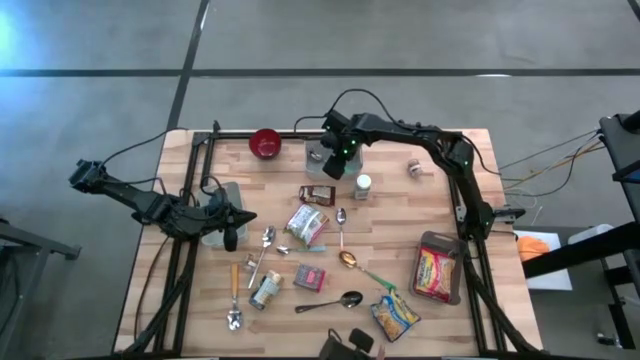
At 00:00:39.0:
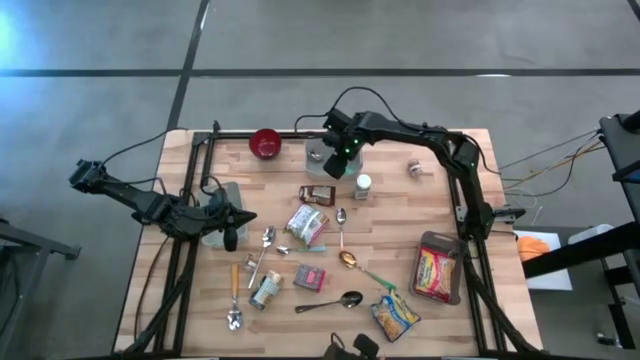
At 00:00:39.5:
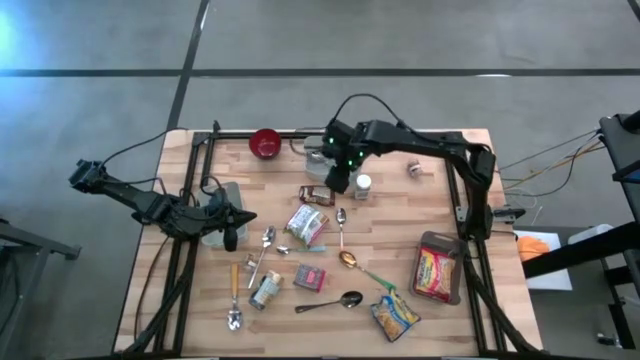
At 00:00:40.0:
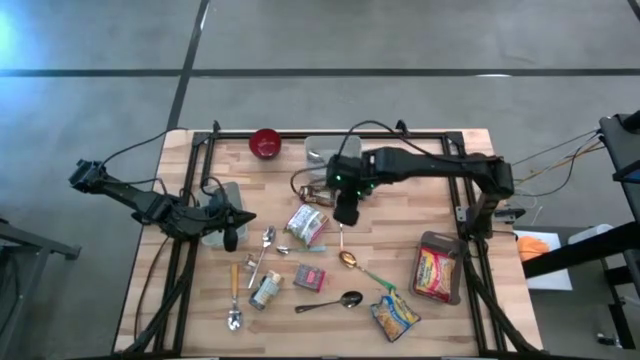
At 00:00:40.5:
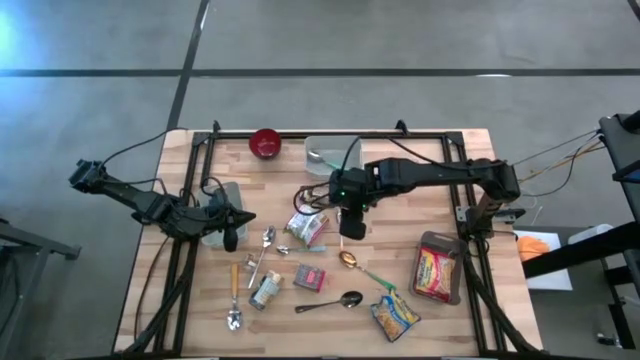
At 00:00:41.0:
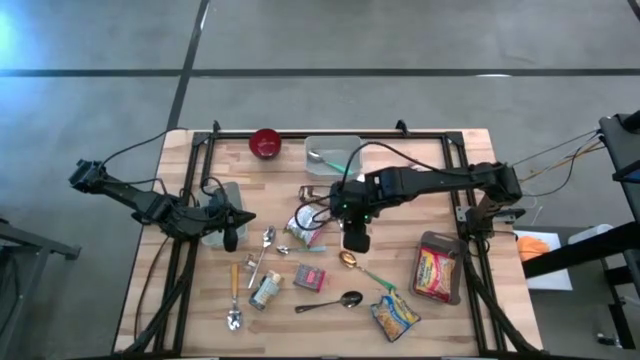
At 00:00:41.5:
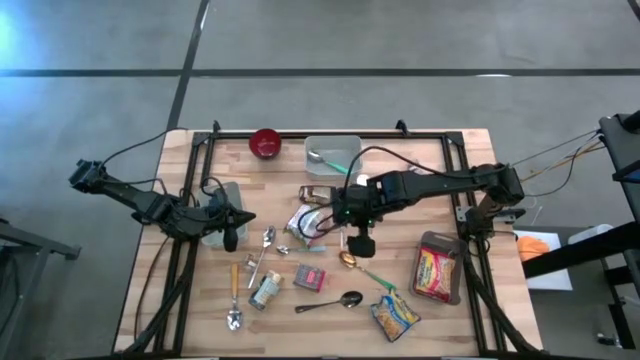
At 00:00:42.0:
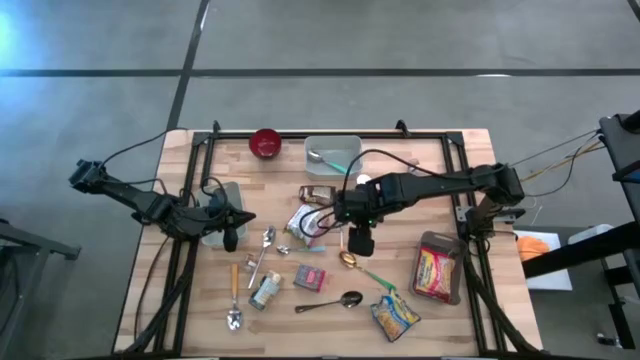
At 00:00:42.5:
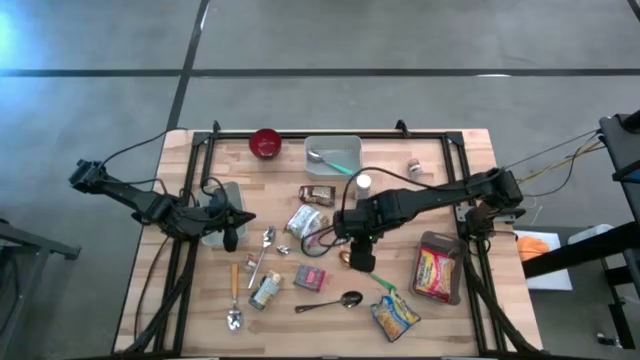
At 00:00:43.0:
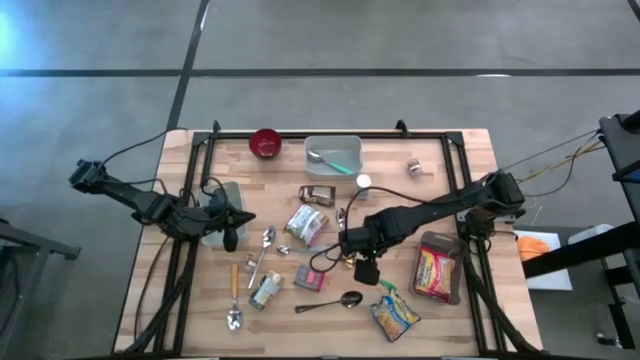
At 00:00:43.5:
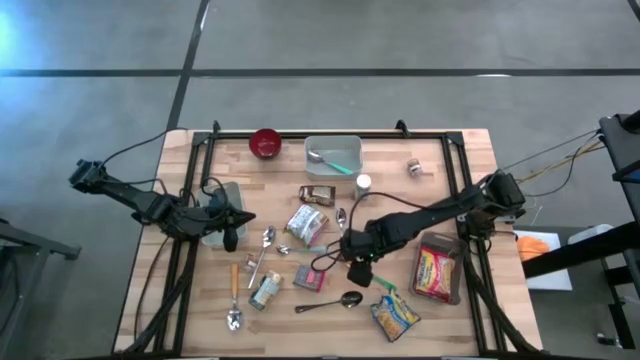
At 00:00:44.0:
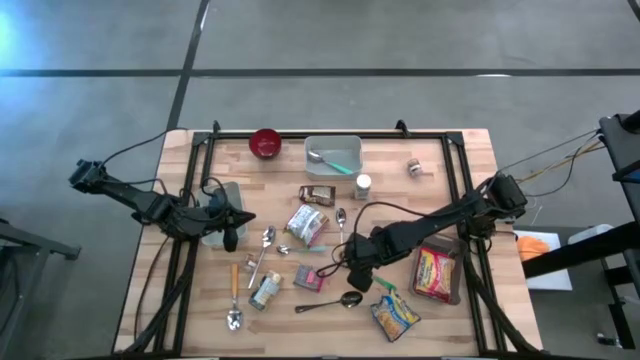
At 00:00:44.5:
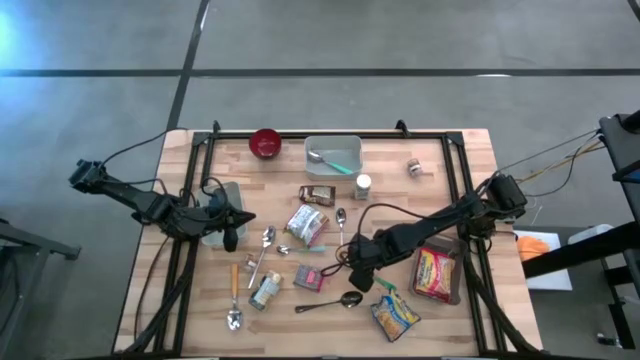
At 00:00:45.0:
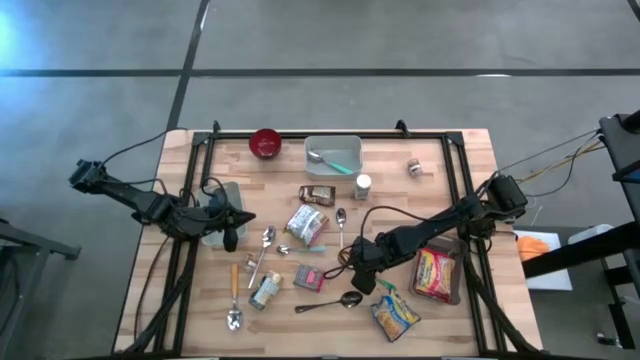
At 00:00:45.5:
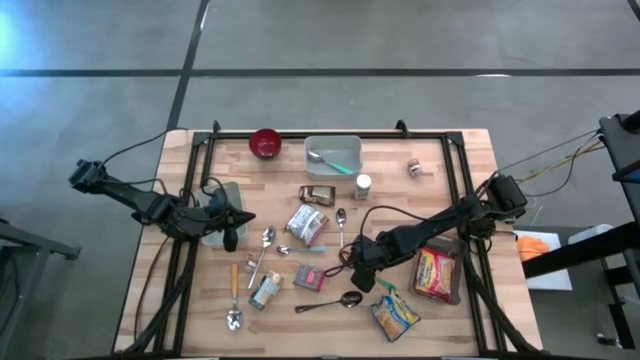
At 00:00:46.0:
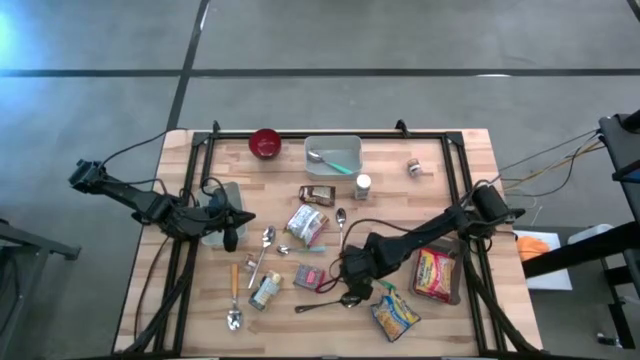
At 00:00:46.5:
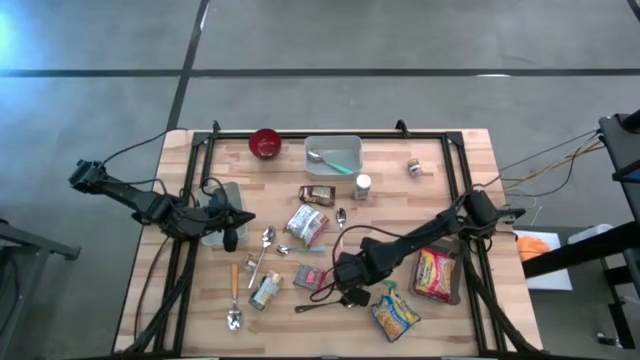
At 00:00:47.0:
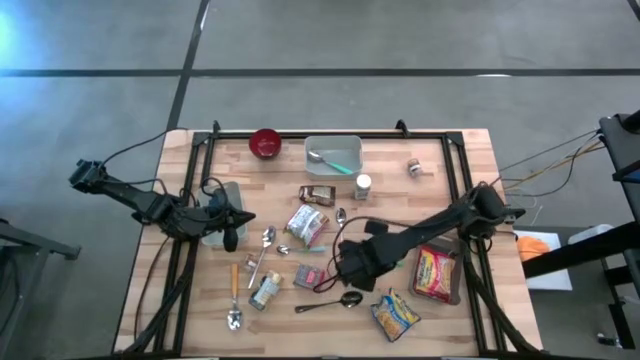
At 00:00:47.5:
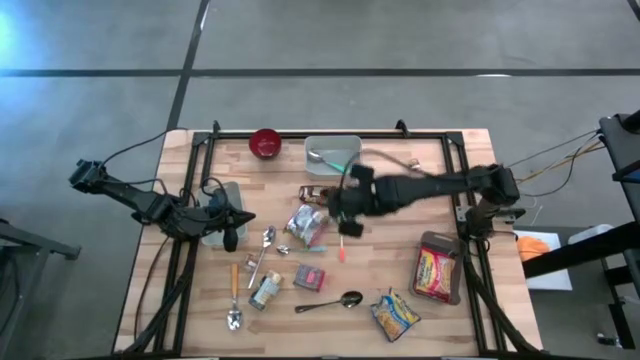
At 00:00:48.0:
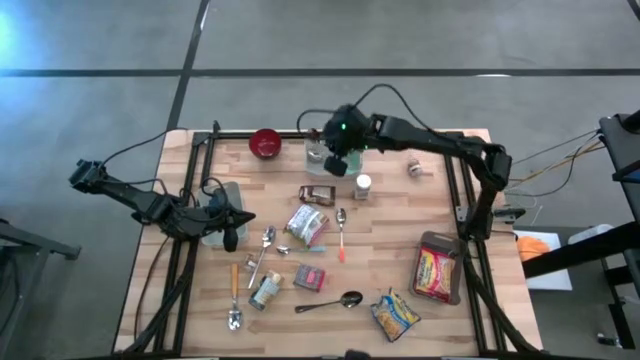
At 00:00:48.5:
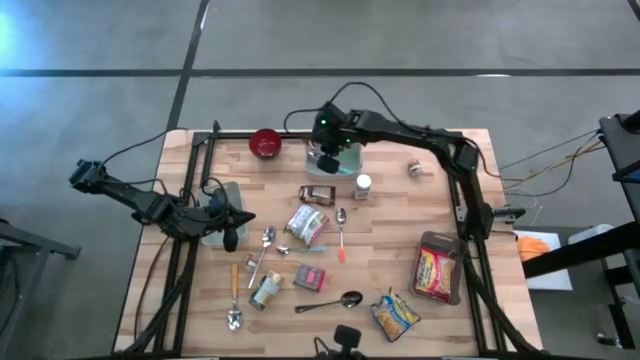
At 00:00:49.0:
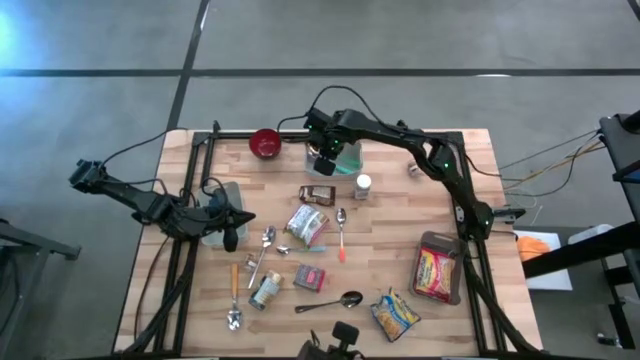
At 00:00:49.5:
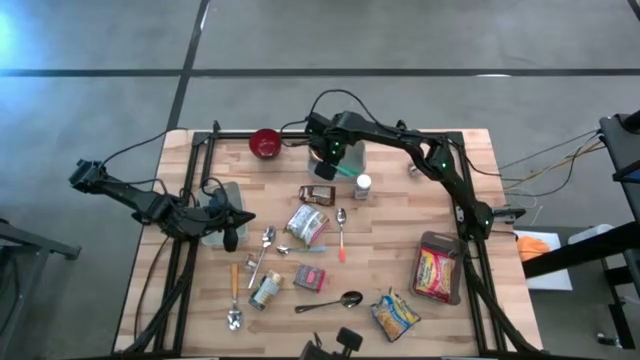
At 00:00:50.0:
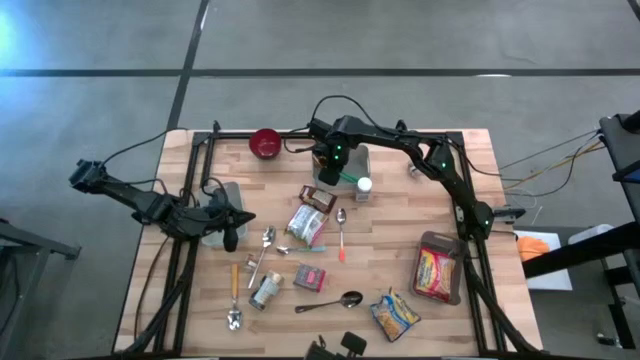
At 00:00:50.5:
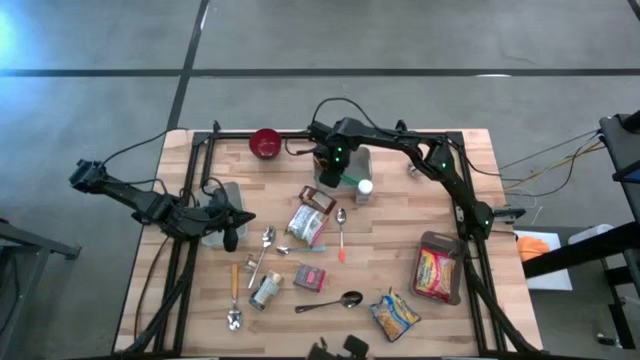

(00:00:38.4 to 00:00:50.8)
Put the green spoon into the right gray bin

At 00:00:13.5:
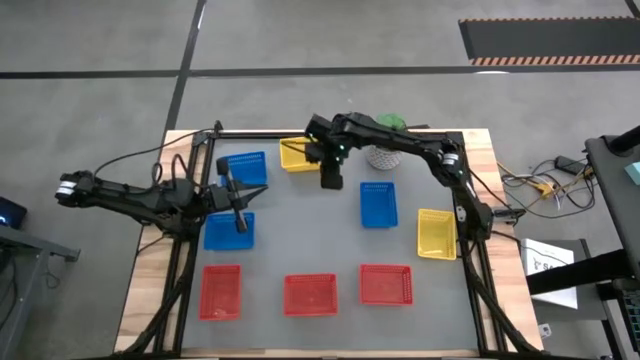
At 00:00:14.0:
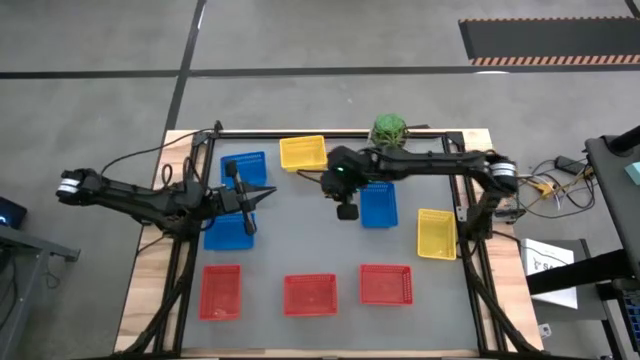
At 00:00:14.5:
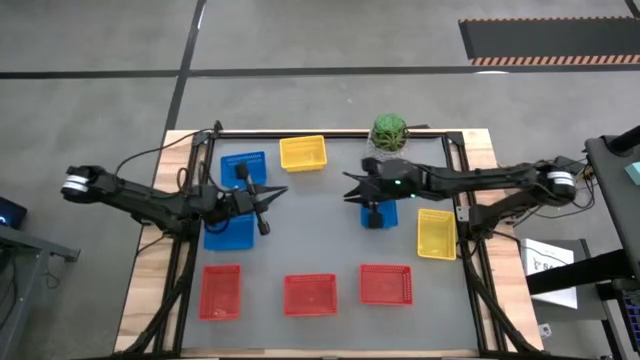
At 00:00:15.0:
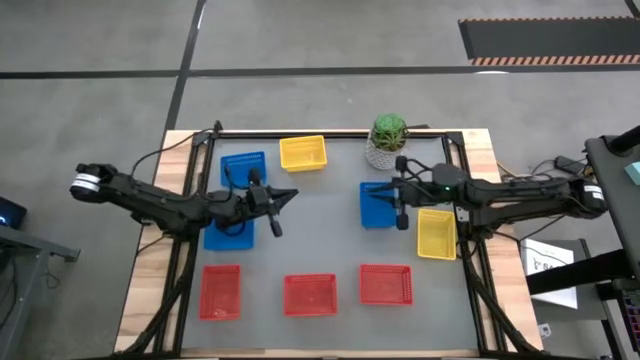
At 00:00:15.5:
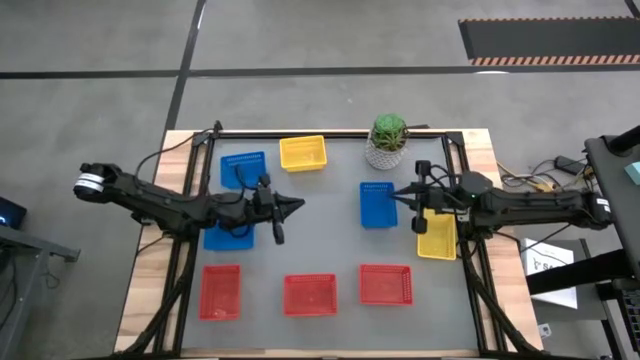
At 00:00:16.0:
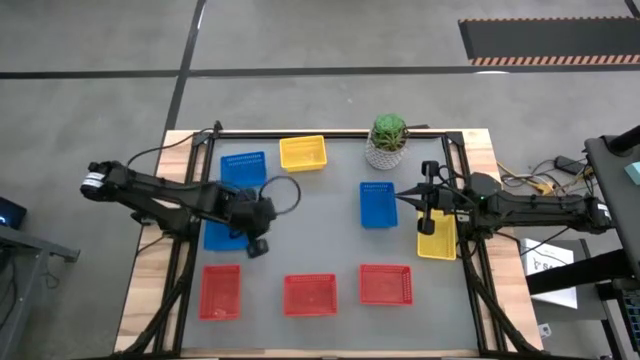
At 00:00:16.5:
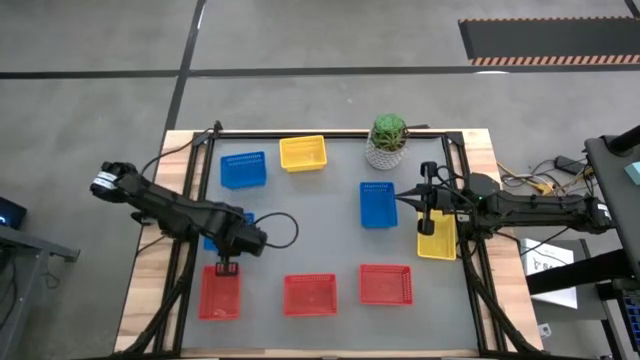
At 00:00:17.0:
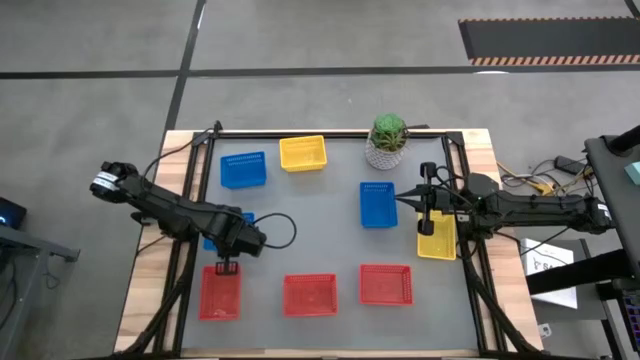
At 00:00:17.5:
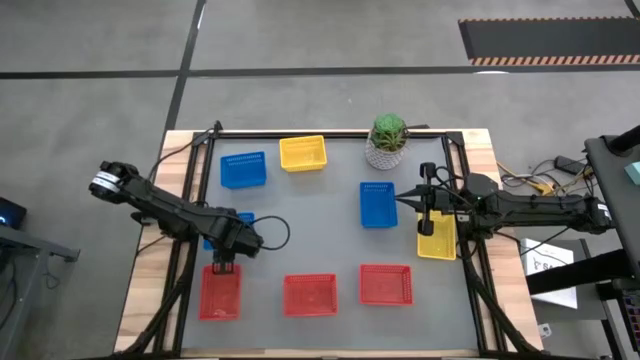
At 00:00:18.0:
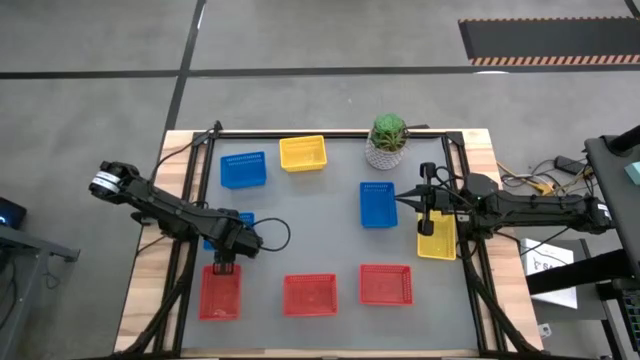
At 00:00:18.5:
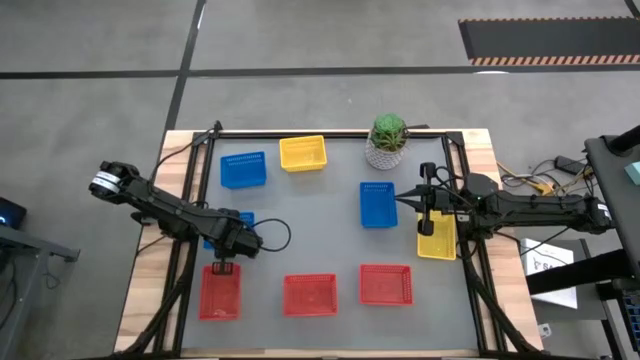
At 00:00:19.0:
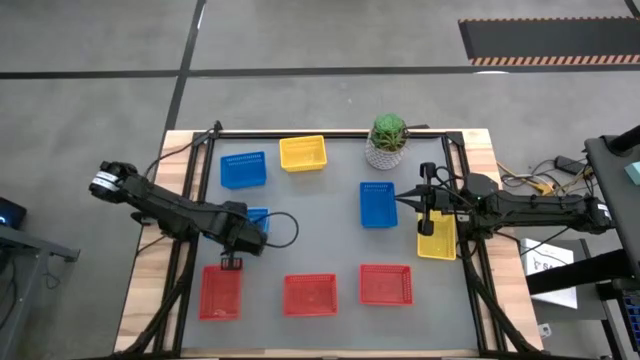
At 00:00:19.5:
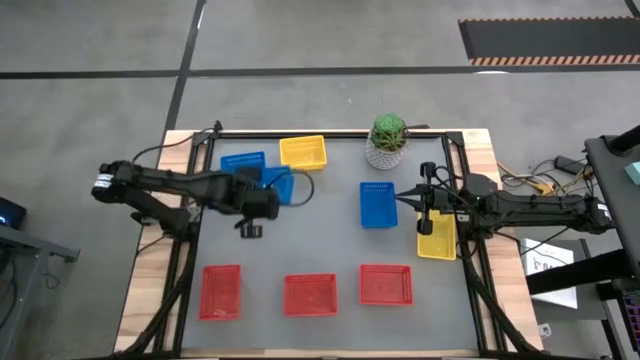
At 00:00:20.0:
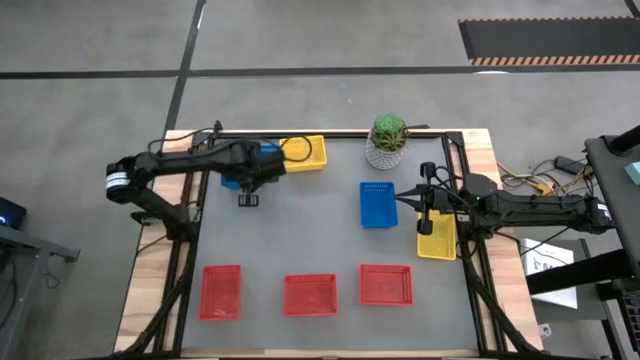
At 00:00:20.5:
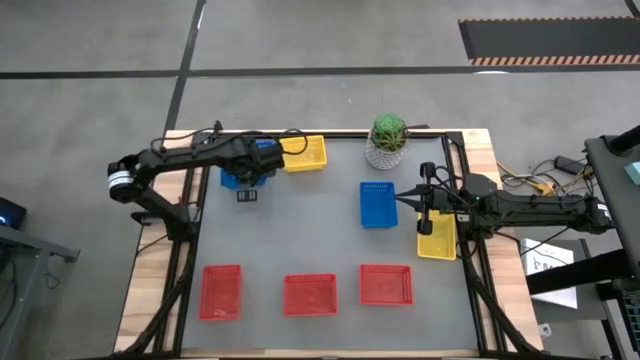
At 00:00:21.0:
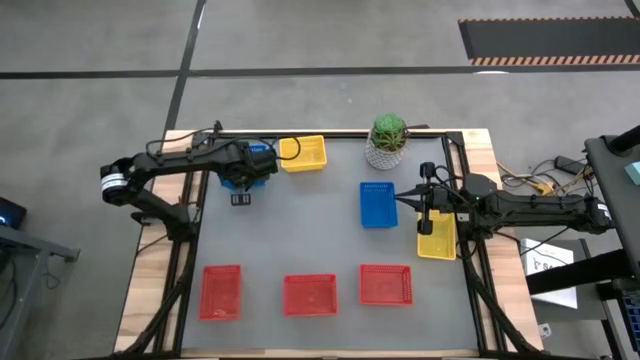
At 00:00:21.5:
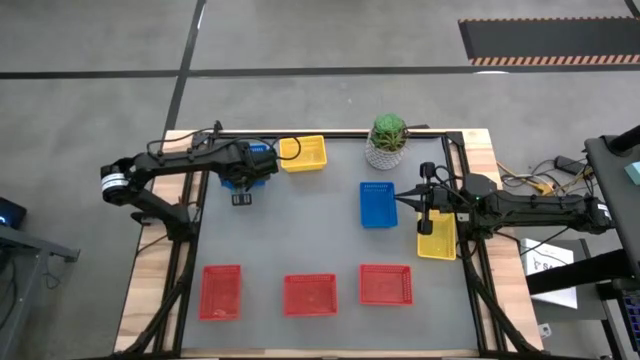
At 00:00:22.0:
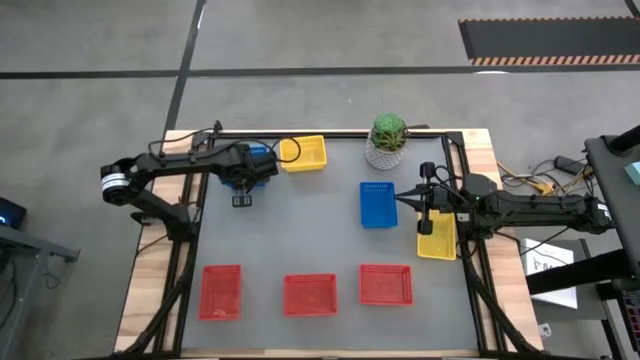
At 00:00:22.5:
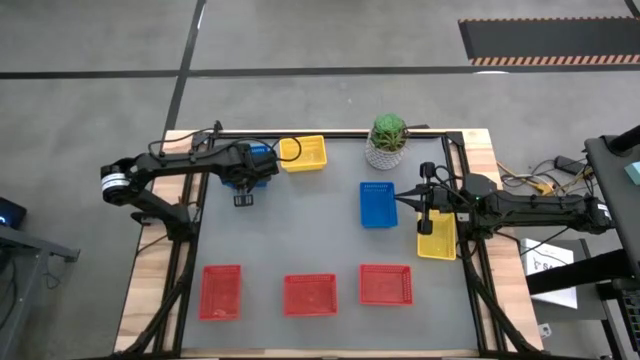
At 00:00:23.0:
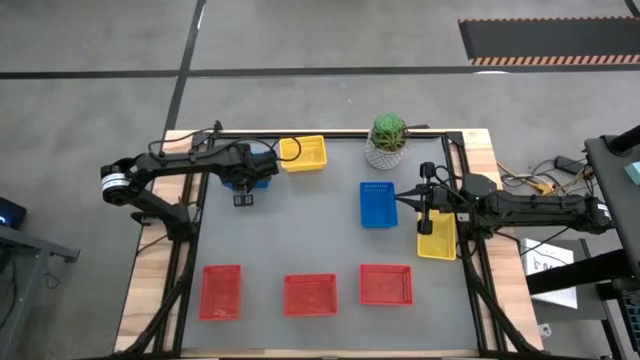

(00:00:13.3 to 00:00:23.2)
Stack the bottom blue basket on top of the top blue basket
